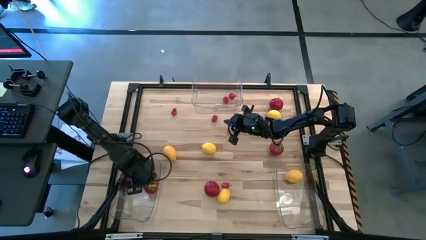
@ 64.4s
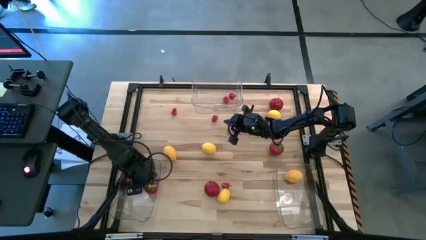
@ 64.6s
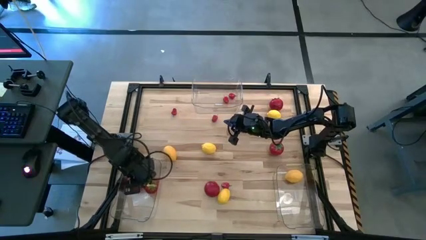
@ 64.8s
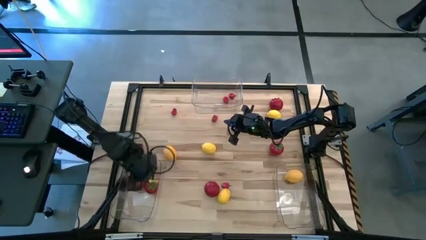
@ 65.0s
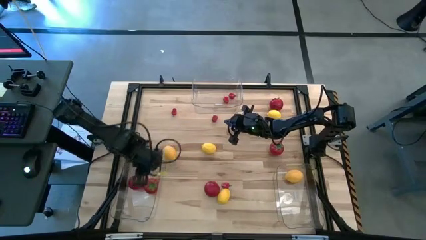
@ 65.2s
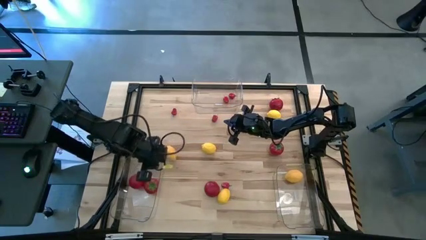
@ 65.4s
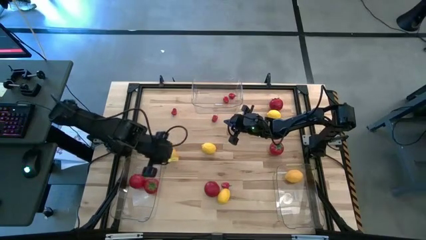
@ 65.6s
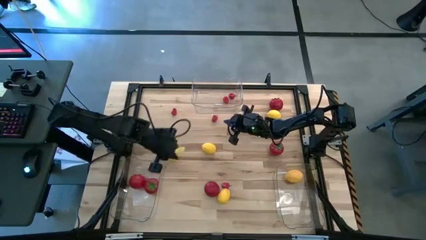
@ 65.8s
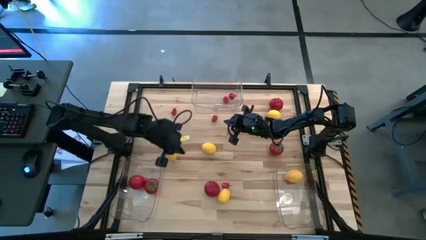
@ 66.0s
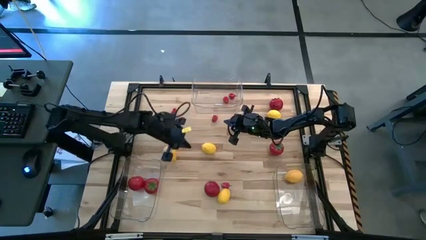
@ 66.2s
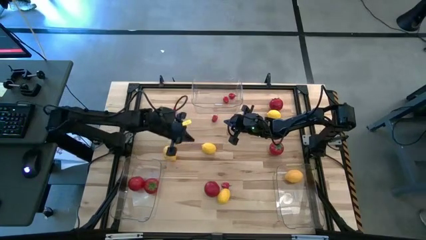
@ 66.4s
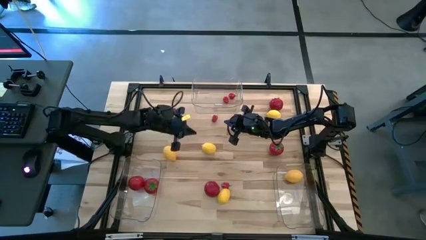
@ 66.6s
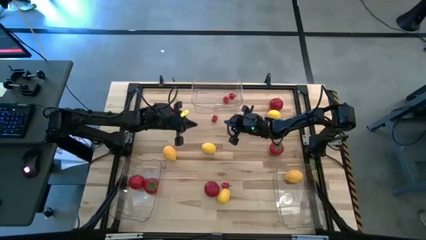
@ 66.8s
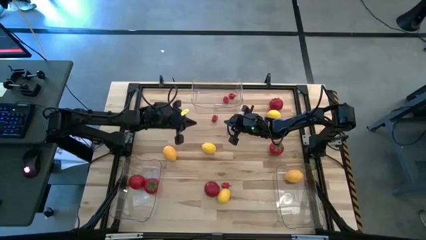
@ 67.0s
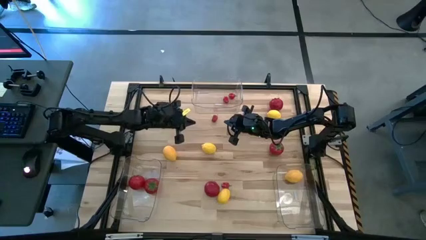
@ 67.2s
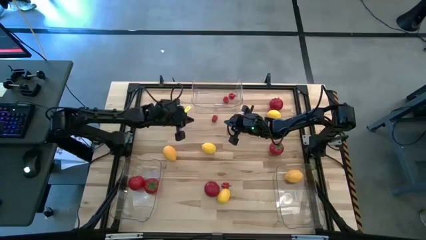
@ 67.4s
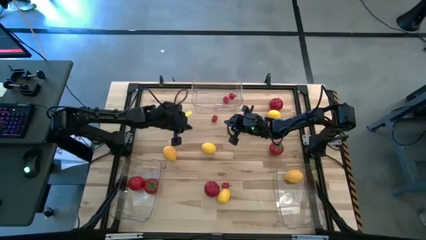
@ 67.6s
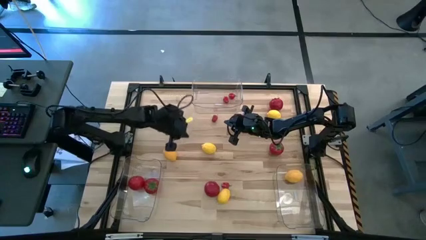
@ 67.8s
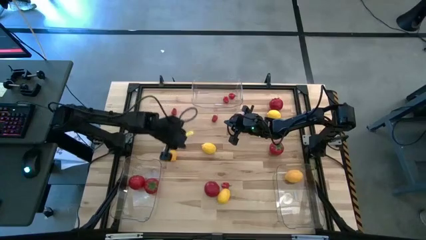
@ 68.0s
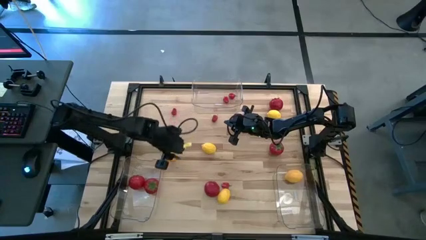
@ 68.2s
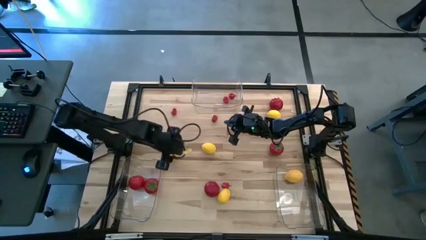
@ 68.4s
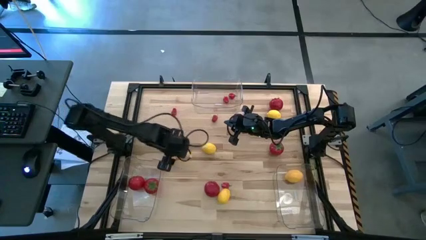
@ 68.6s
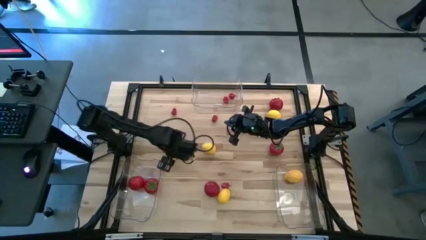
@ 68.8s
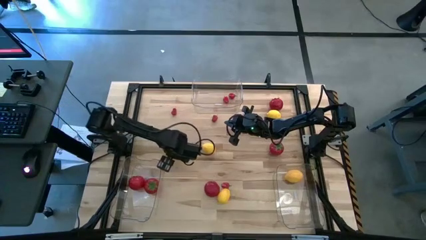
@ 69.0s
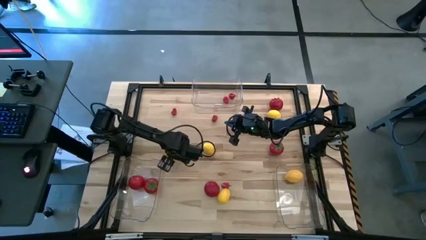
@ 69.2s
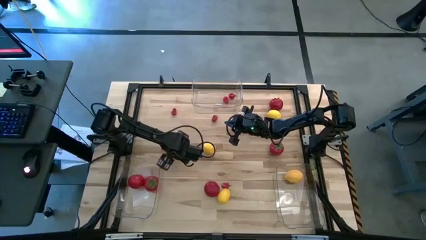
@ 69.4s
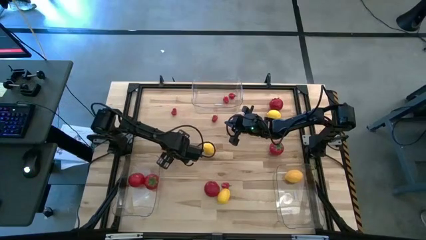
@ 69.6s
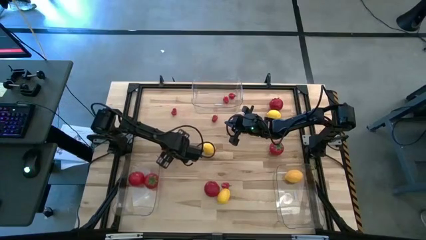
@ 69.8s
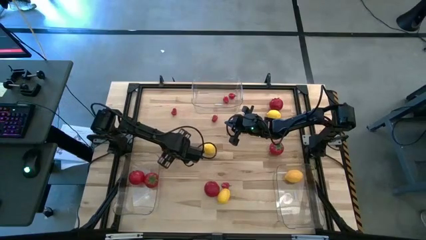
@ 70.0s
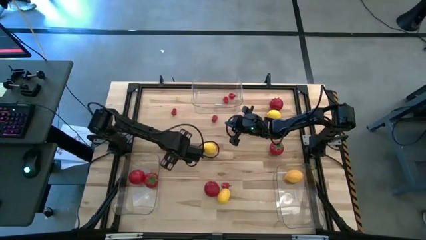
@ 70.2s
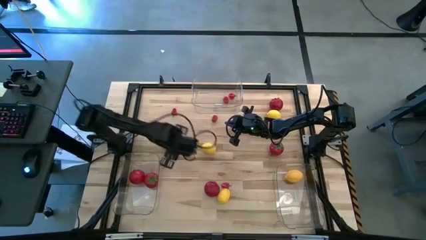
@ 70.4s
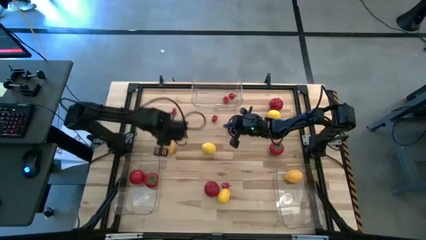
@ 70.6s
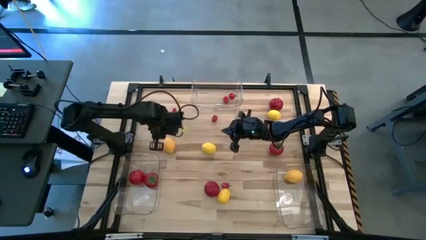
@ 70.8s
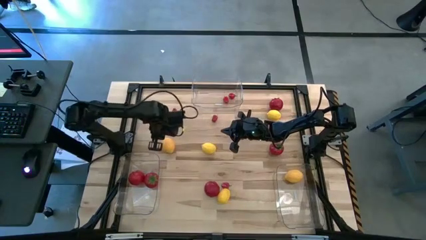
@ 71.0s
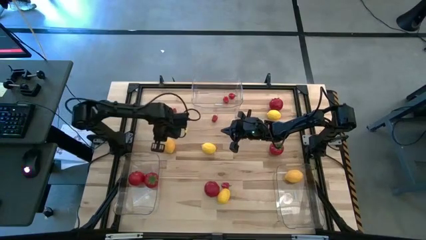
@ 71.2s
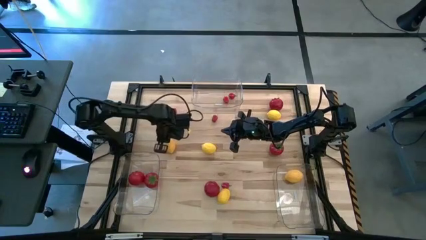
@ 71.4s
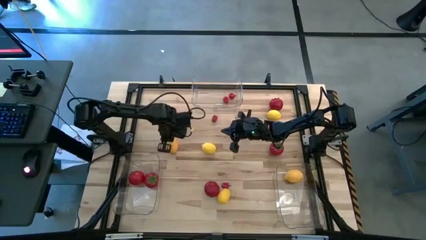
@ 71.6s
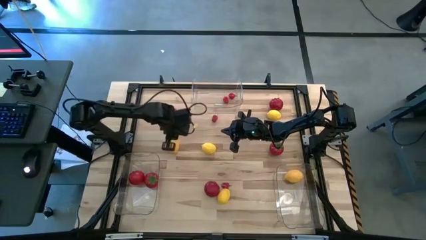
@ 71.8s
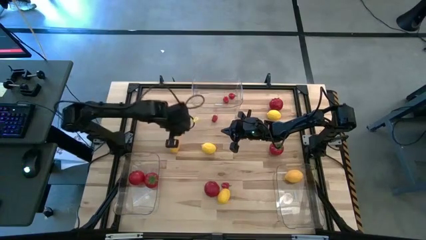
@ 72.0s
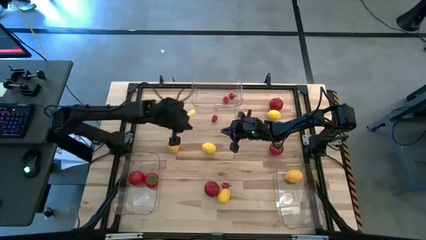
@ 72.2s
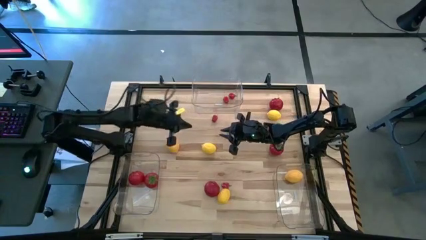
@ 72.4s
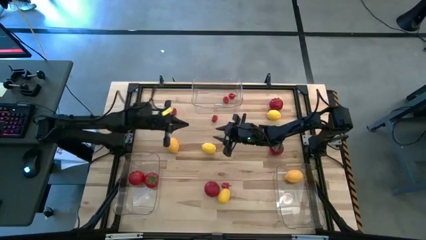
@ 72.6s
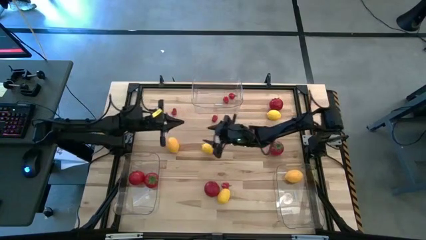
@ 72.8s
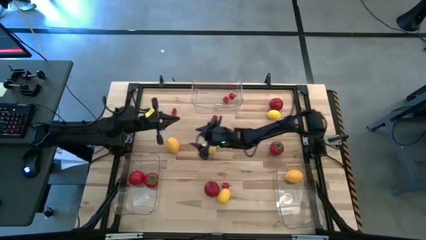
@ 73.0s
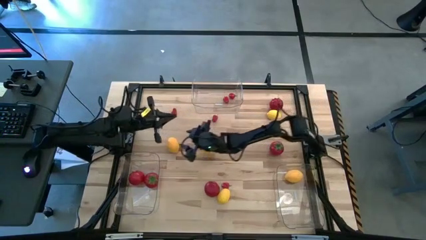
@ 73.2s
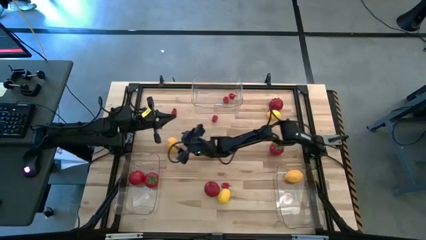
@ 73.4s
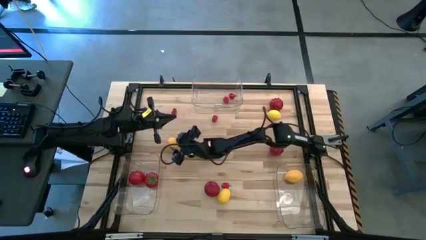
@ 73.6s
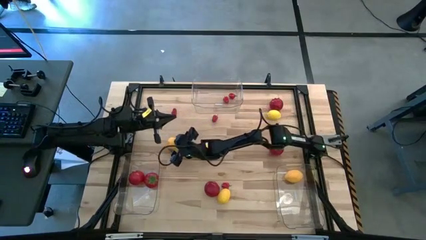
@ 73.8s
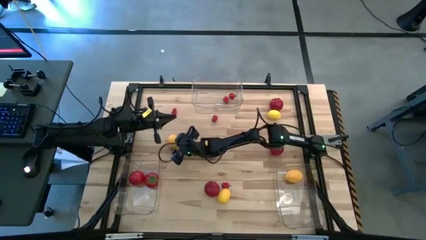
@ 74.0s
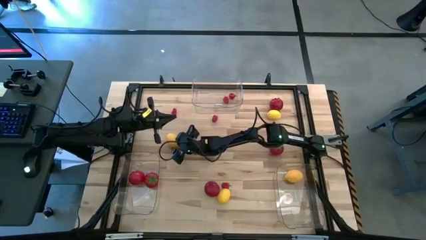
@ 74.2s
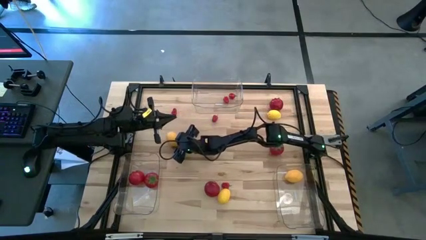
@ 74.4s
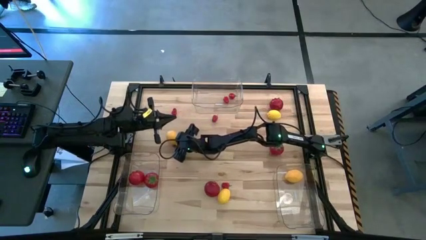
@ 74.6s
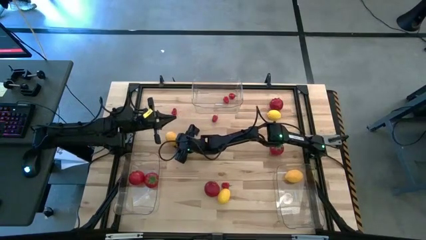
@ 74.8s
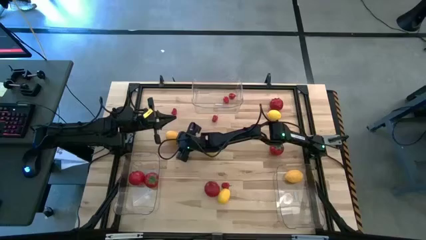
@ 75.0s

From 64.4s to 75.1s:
Task: Sort produce into baskets
Put the yellow lemon into the bottom right transparent bin

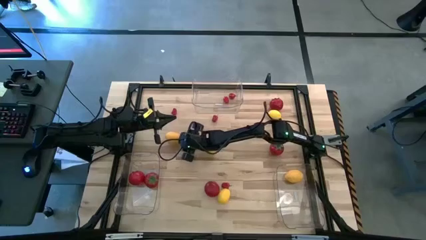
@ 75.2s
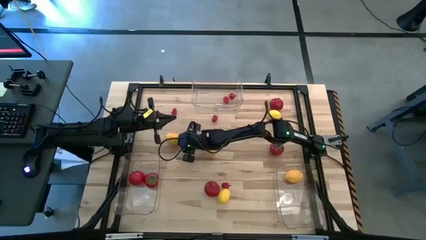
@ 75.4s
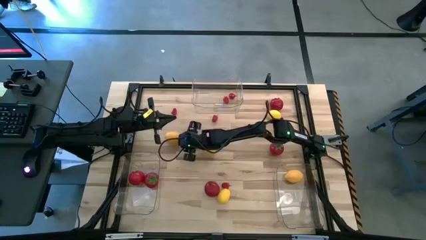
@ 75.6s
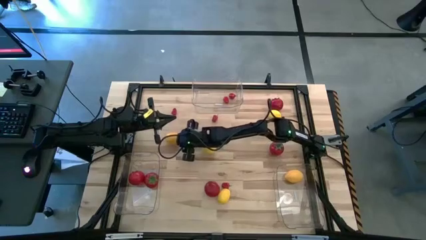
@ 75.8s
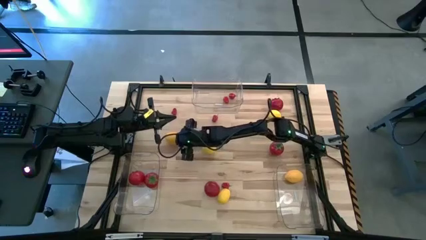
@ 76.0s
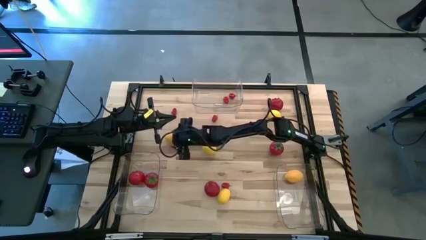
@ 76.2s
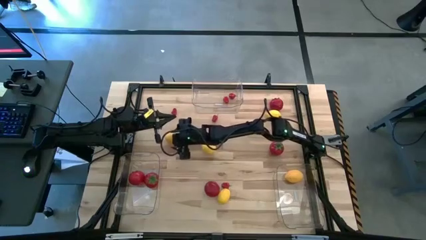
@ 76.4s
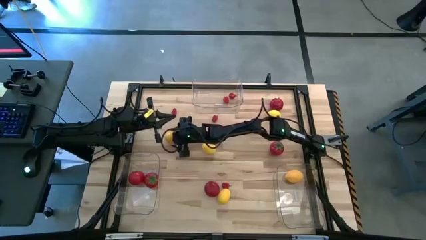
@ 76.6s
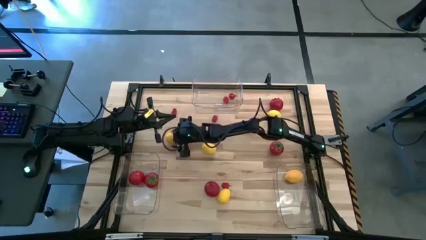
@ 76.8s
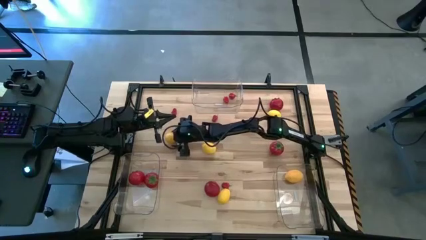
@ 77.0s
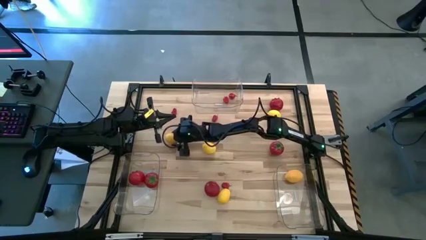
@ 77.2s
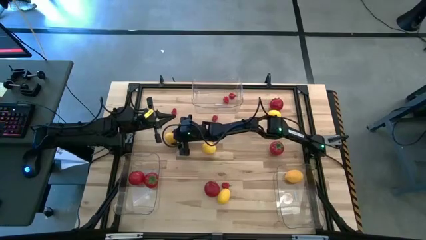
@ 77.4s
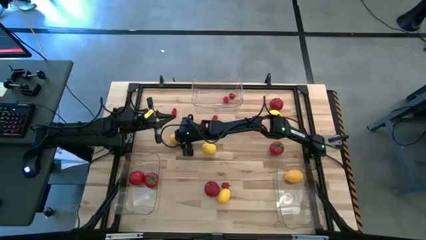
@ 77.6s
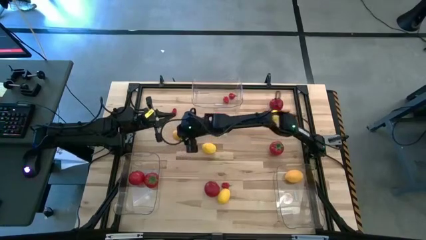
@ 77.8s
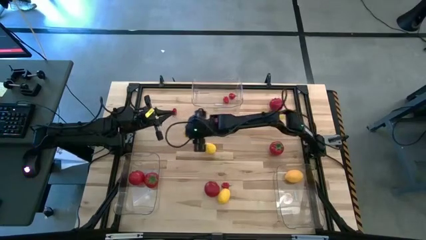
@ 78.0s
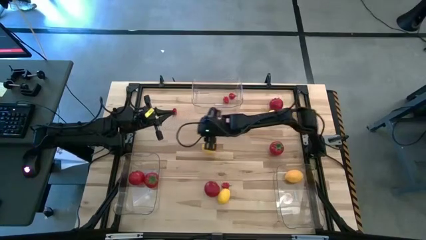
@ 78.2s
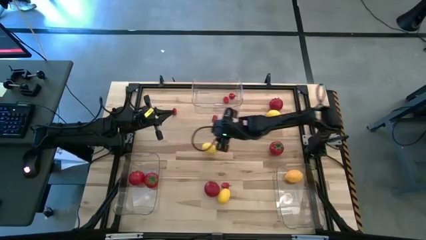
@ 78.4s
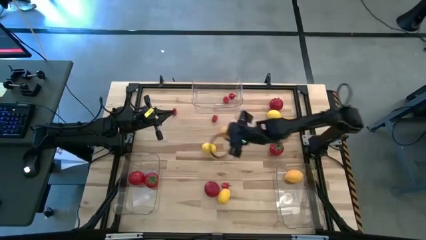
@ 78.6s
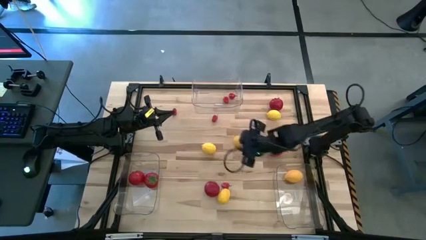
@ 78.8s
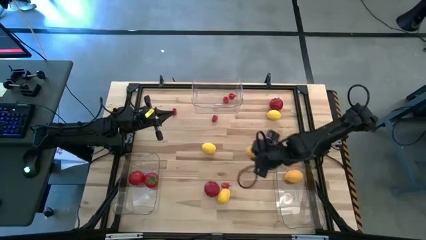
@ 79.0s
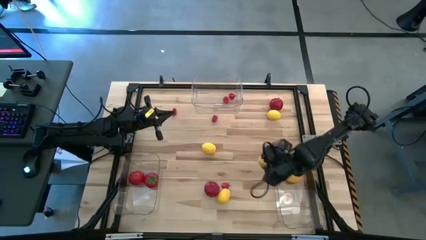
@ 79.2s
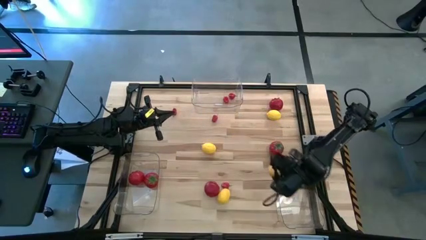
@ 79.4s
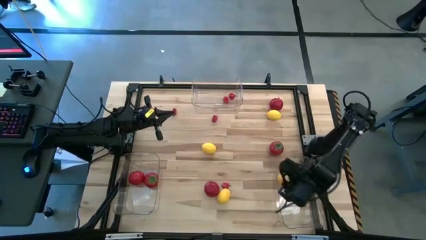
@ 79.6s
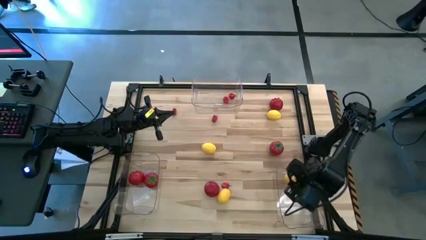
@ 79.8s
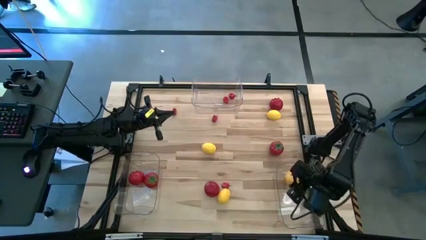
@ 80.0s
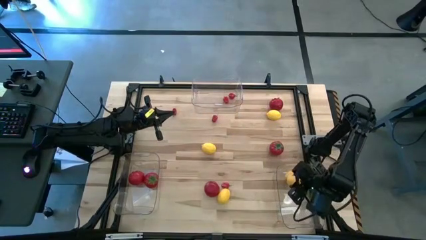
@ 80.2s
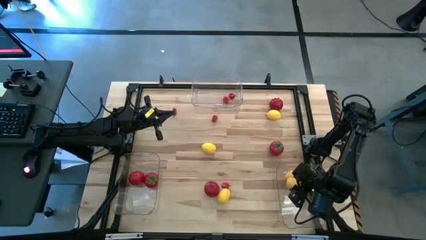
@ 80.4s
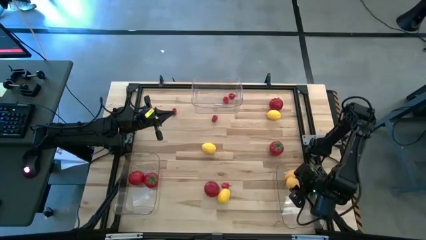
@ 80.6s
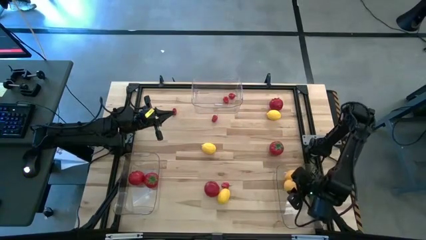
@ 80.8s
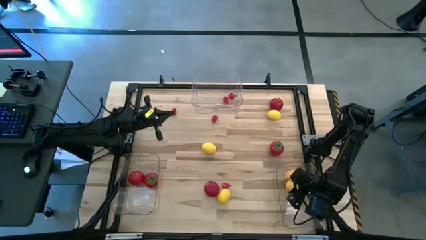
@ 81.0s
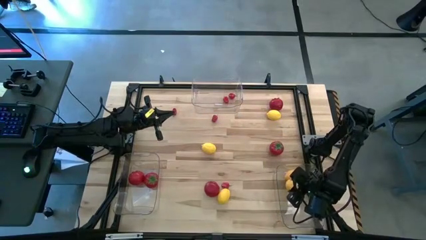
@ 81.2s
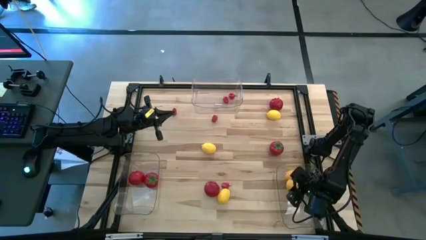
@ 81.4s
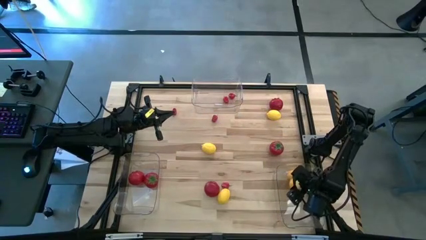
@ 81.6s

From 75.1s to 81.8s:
Put the yellow lemon into the bottom right transparent bin

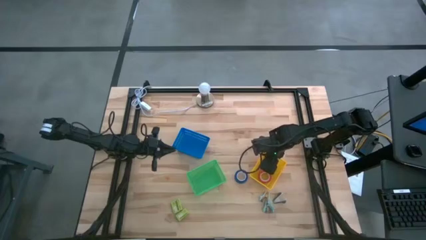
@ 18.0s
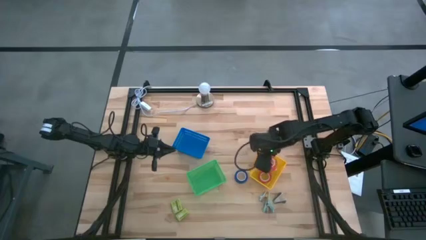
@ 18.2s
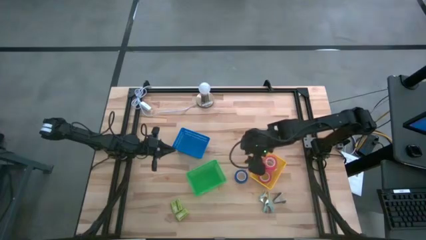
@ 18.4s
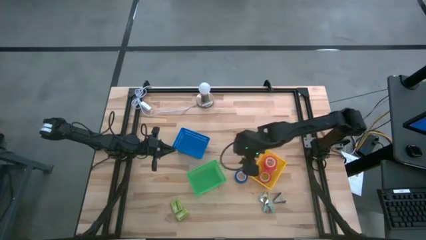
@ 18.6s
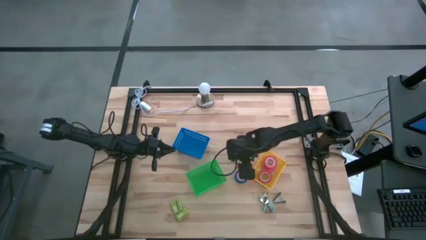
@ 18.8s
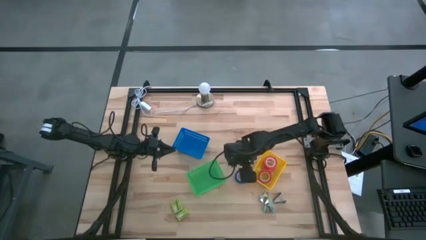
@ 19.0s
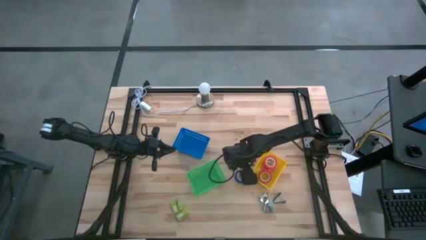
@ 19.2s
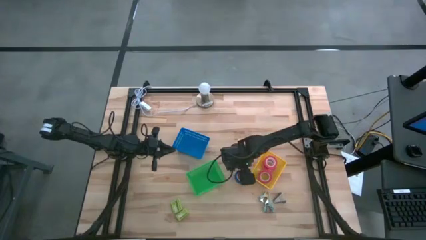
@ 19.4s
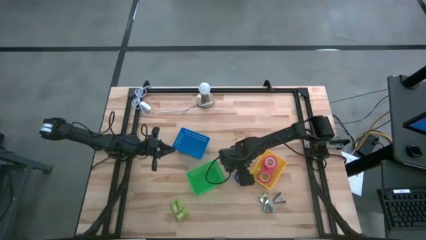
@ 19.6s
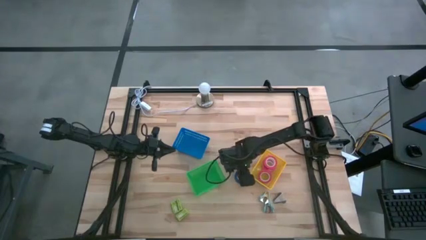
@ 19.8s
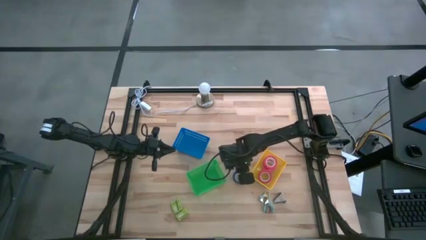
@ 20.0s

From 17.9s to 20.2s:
Task: Pick and place Stapler, Stapler remover, tape
Put the blue tape into the yellow bin
